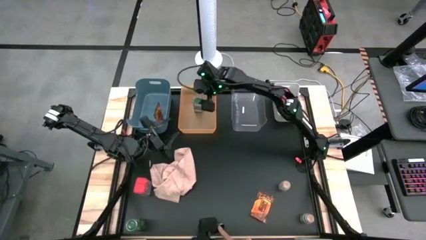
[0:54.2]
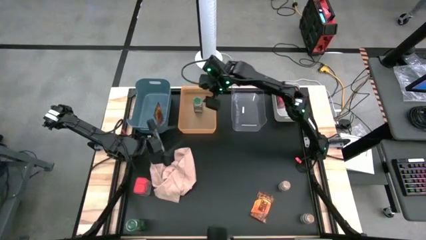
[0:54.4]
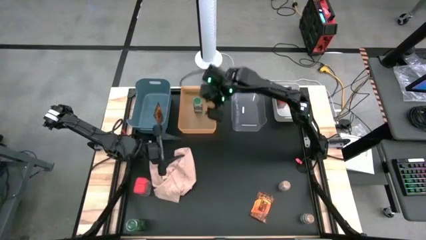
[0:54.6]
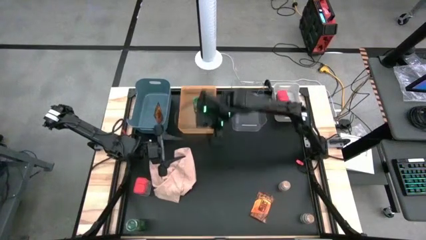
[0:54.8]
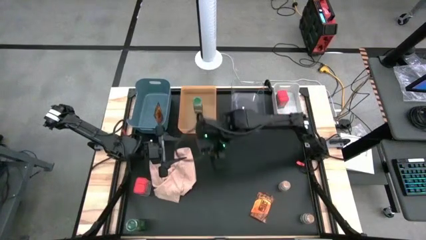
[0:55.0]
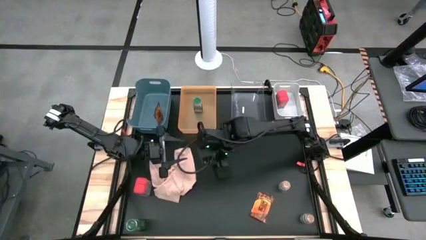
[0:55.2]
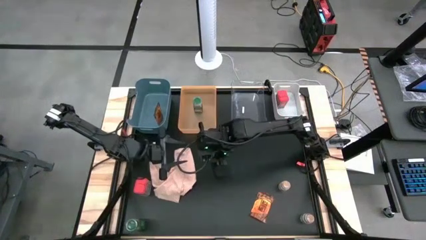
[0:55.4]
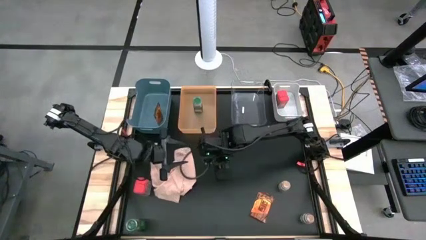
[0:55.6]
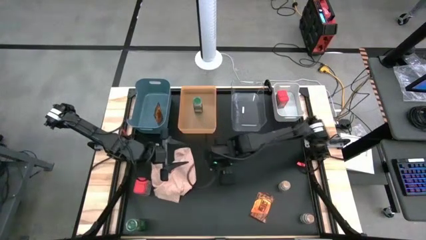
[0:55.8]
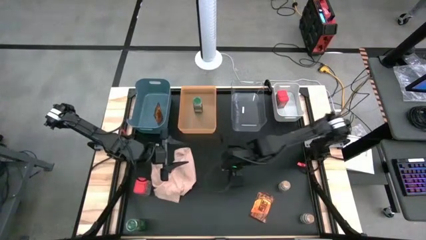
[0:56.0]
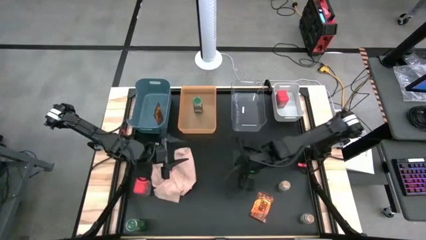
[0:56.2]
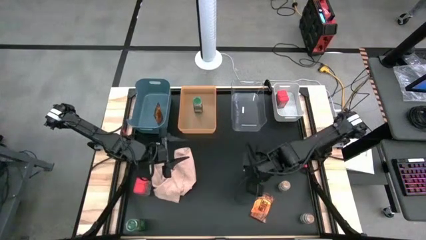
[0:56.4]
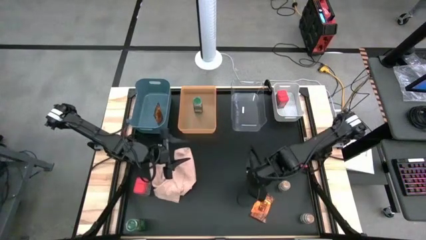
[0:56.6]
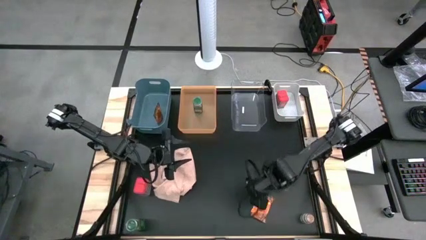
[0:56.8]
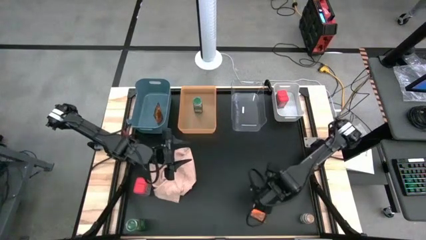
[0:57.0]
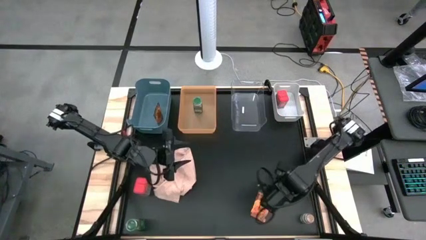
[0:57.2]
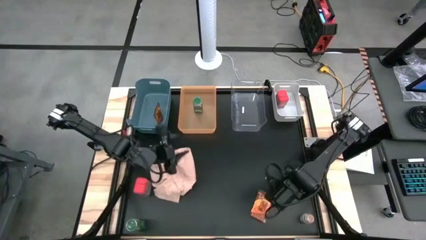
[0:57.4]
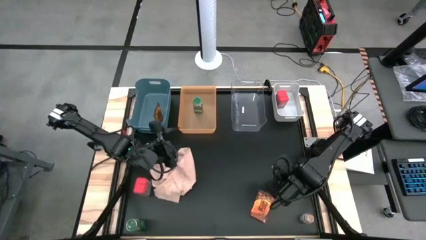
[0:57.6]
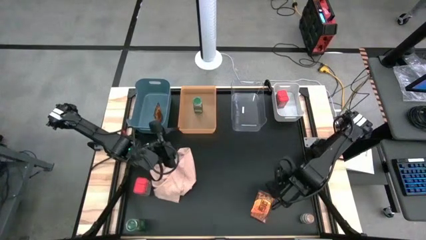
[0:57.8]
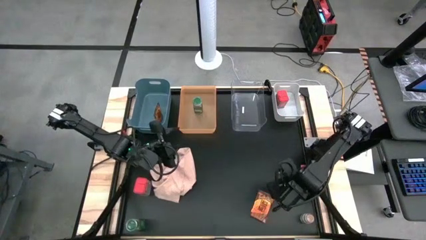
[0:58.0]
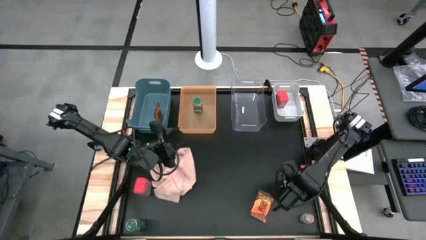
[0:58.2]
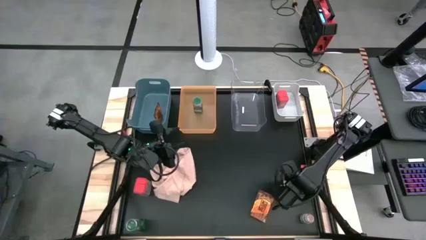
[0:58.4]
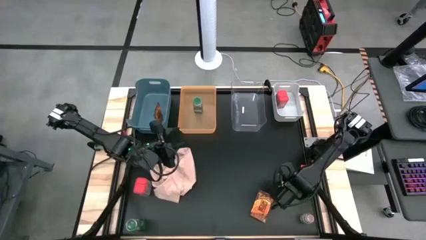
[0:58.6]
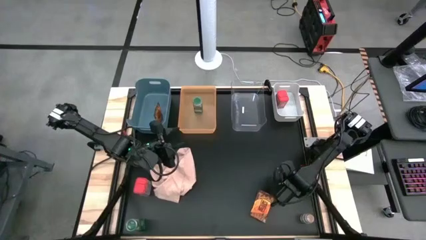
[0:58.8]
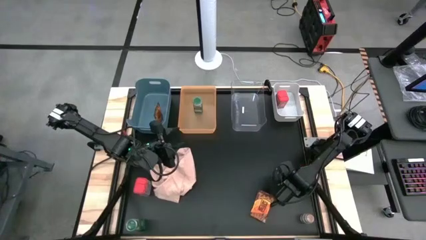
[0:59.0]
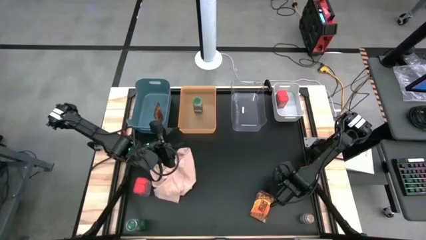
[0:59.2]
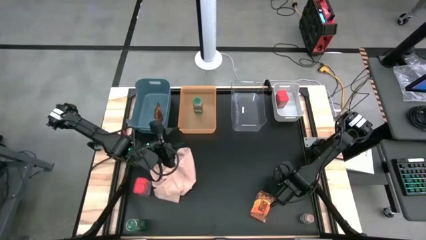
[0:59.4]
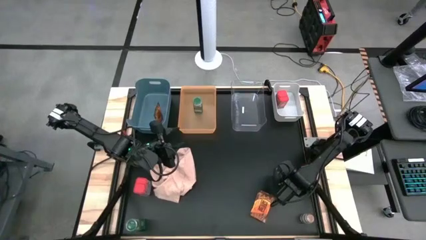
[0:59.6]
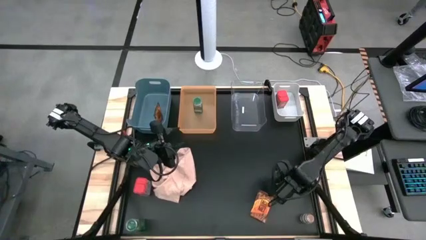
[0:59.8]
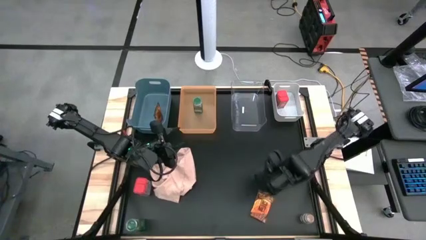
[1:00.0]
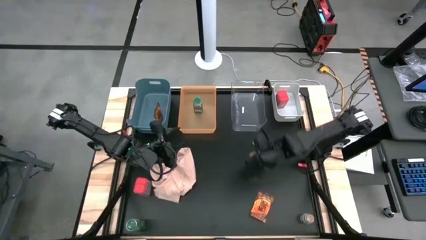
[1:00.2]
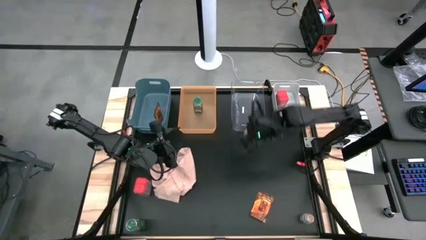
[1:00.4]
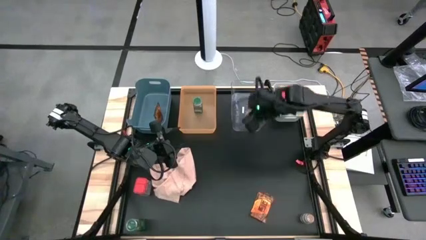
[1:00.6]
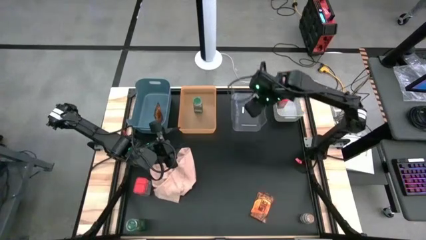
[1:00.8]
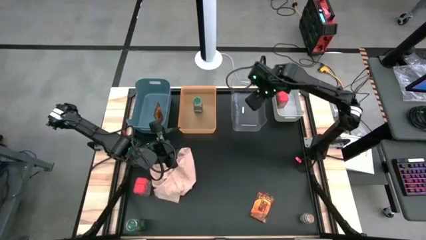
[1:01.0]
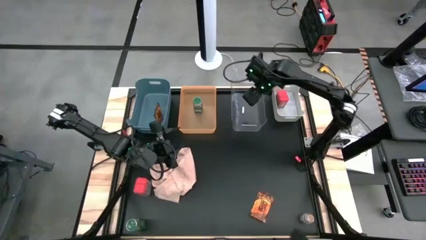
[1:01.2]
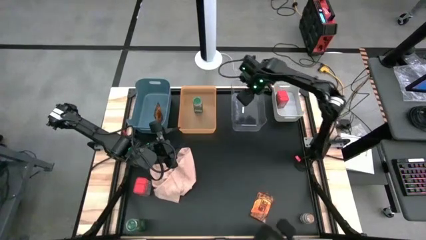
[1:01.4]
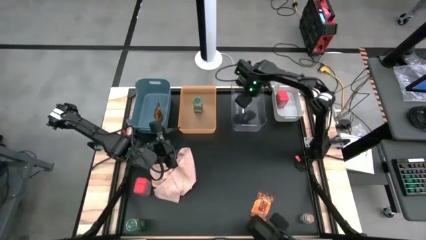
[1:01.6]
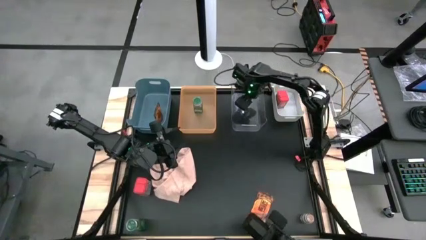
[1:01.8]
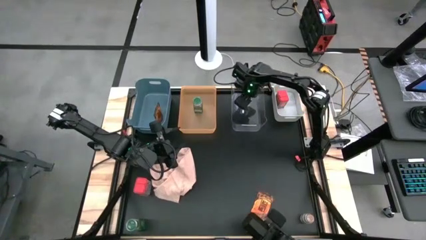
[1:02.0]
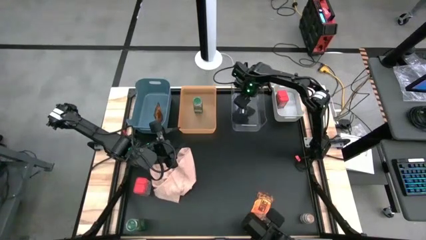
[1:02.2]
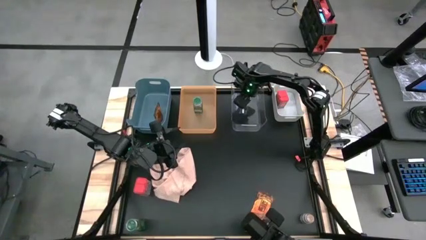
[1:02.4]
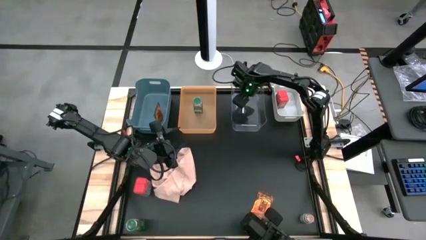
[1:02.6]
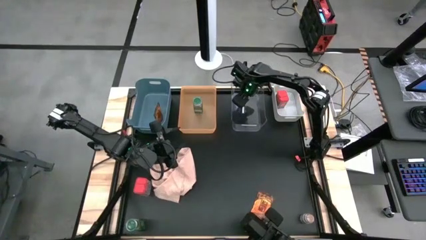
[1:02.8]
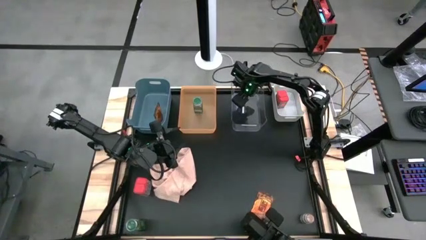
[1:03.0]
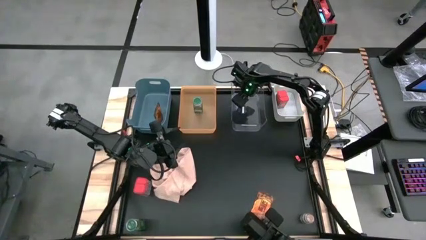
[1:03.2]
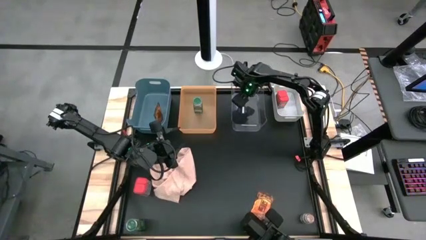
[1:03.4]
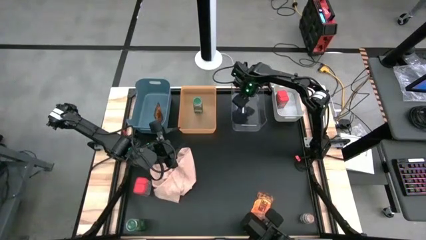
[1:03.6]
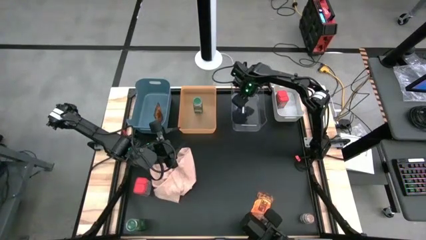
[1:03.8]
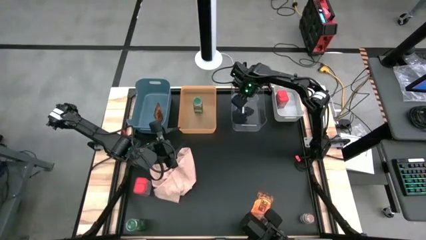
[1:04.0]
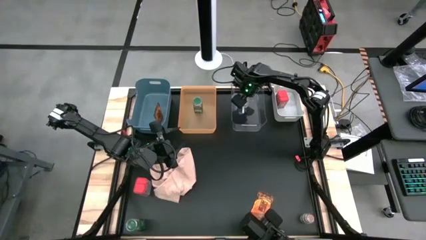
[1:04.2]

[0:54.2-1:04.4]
Task: Sort spices by type
Put the top brown seasoning bottle into the transparent bin

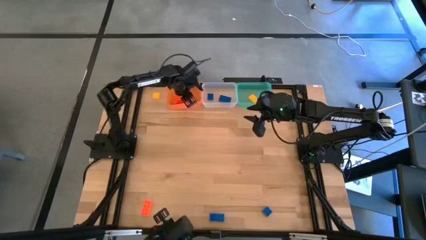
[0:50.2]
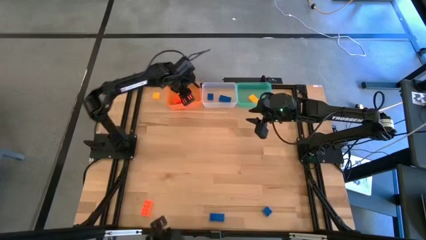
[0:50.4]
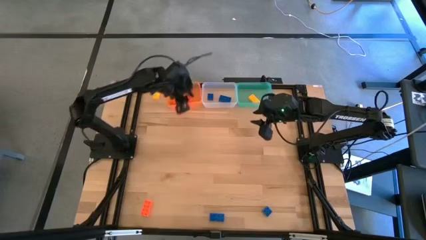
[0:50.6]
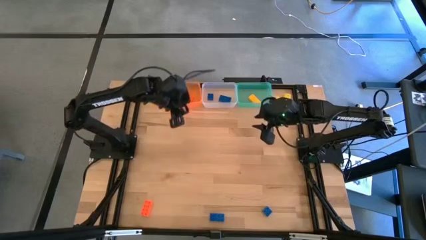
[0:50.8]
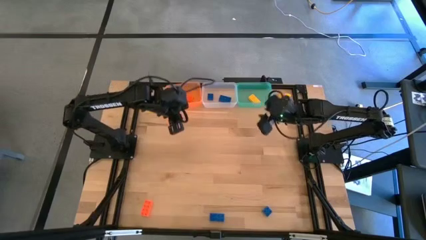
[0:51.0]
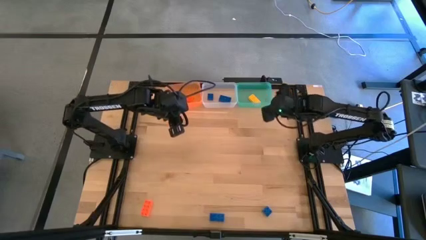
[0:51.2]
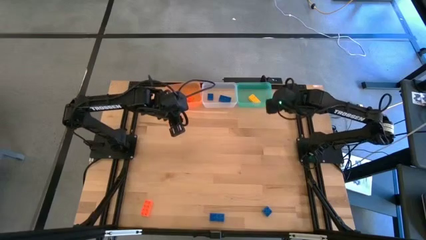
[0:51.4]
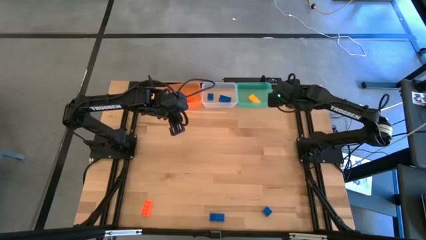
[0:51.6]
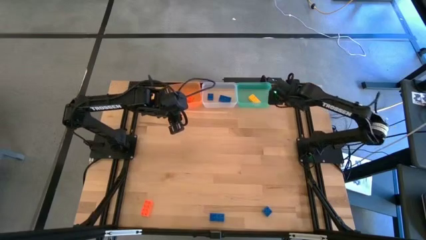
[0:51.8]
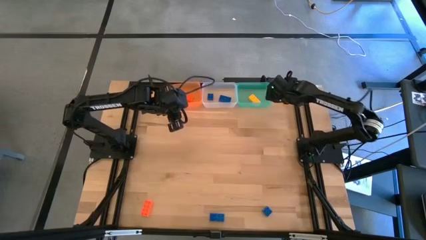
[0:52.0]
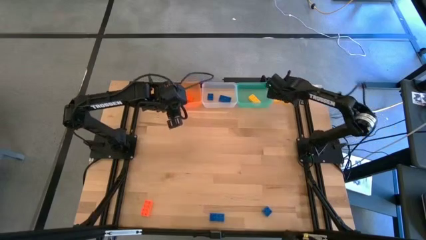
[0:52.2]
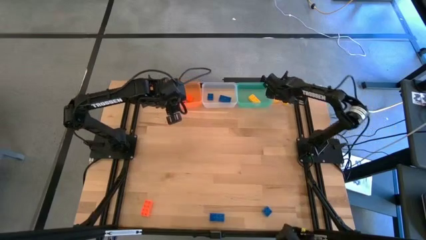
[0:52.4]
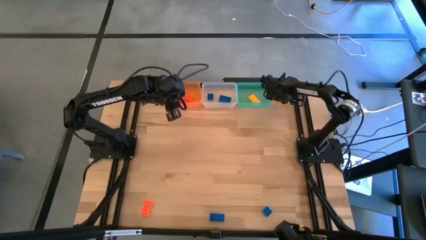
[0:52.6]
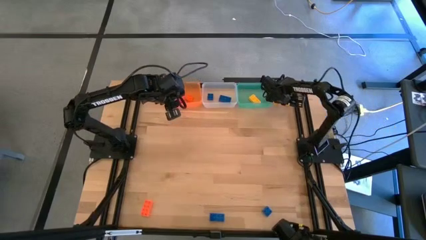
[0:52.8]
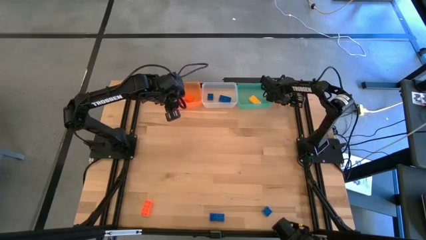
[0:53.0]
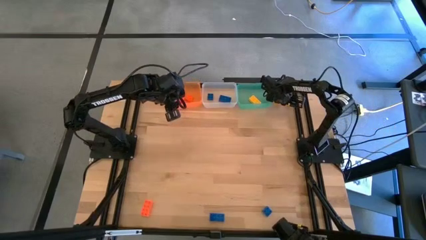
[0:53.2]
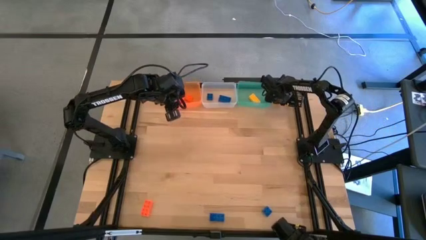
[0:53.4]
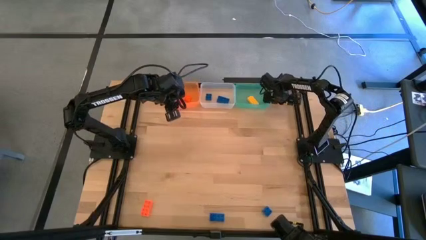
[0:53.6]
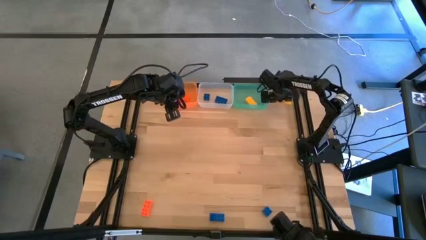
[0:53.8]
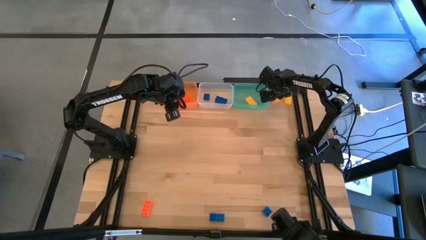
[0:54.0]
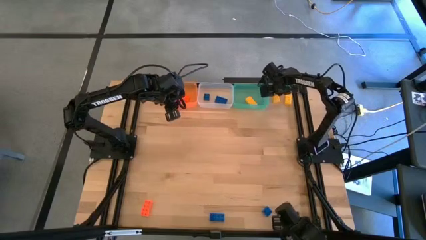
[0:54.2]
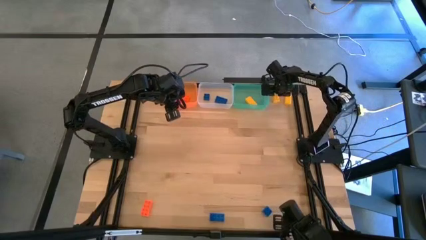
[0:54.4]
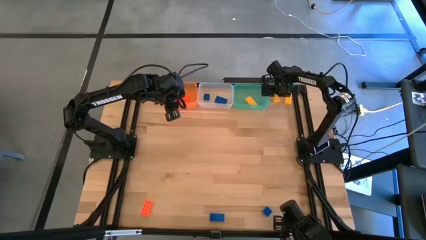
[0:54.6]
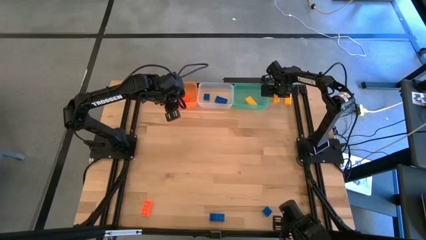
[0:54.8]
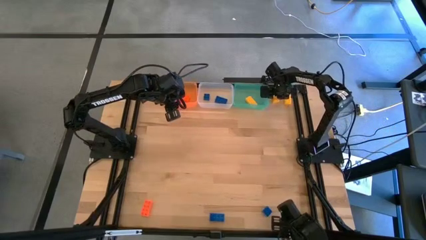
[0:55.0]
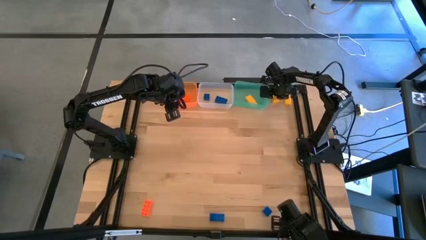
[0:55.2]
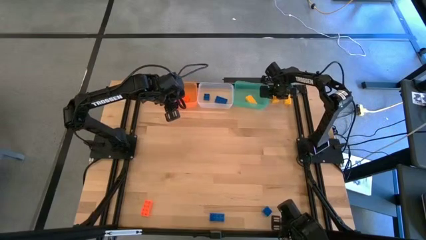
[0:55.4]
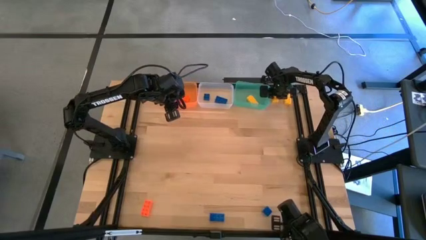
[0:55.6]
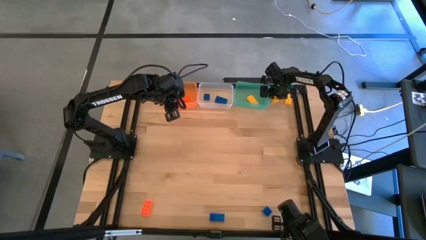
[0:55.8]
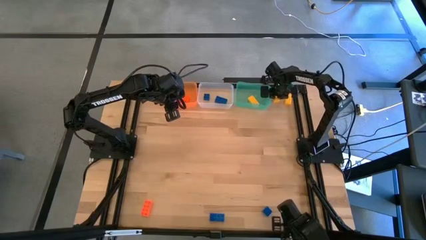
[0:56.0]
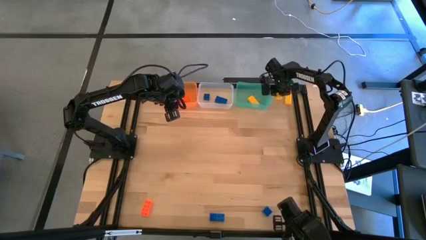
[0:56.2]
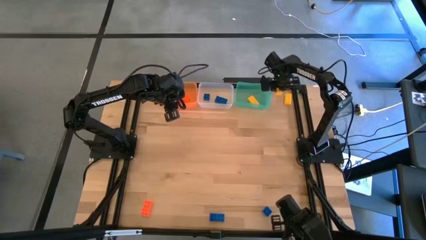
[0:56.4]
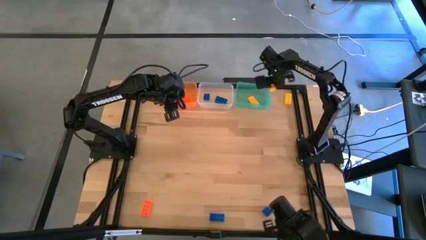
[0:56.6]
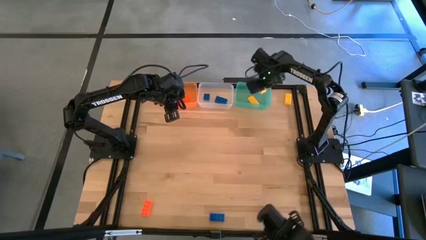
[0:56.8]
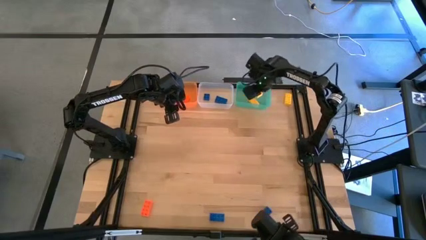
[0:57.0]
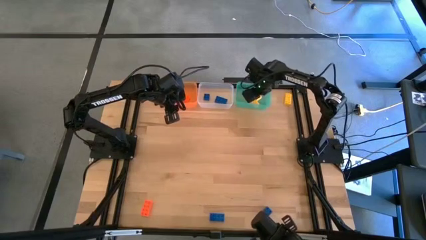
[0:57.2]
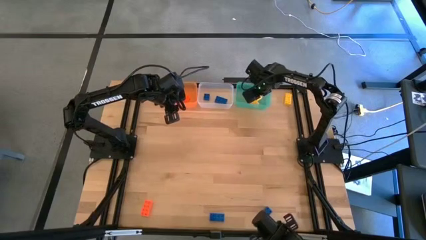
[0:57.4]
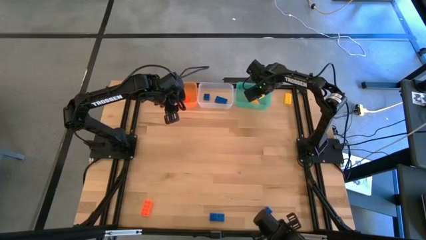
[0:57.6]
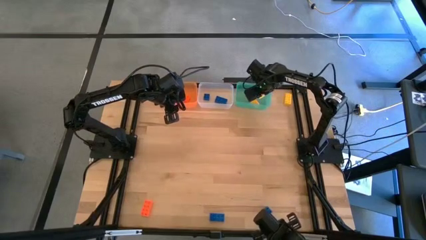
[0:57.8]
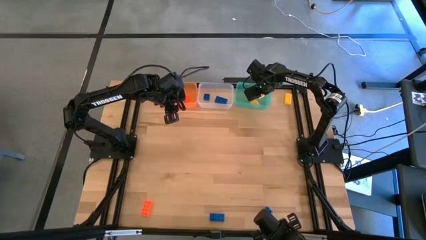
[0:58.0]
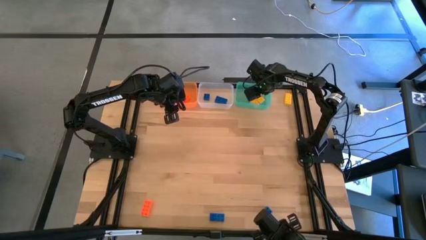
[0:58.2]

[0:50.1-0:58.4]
Task: Sort & place blocks by color
Put the yellow game piece into the green bin
